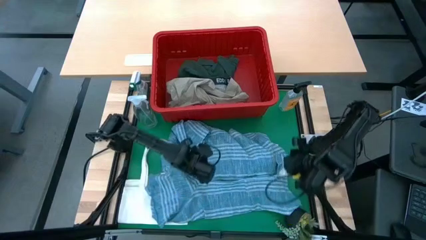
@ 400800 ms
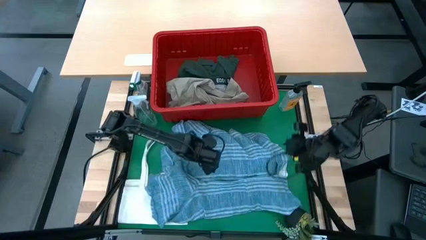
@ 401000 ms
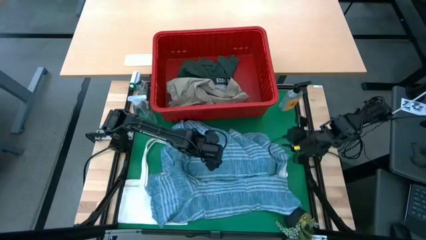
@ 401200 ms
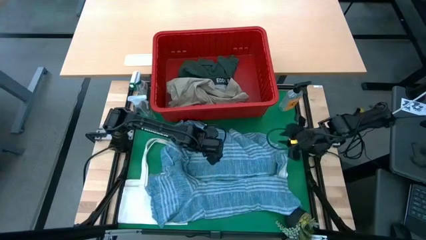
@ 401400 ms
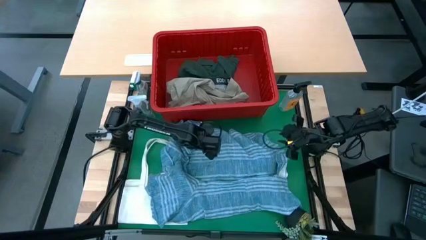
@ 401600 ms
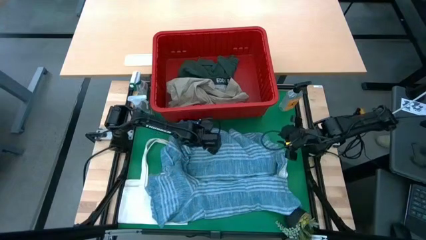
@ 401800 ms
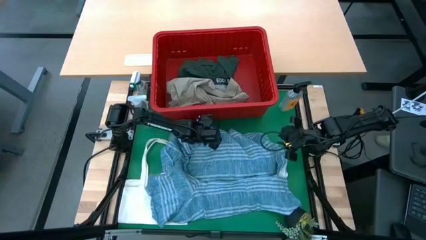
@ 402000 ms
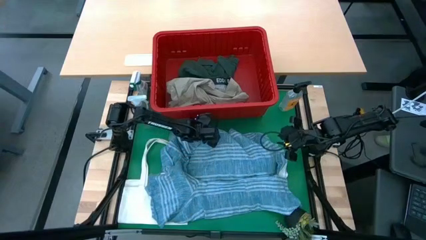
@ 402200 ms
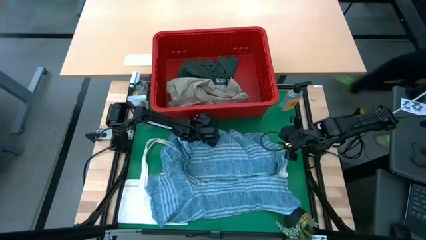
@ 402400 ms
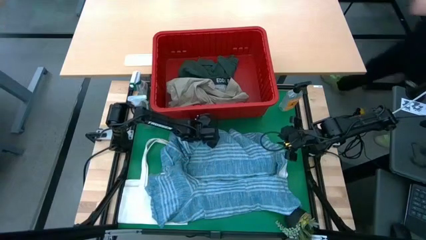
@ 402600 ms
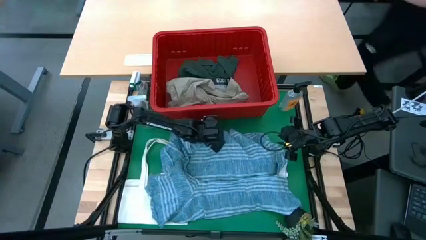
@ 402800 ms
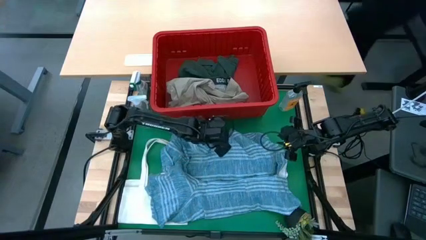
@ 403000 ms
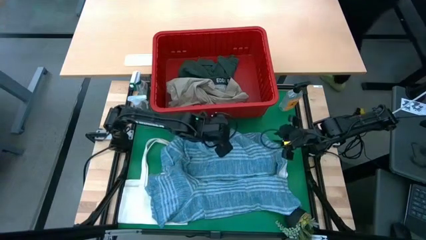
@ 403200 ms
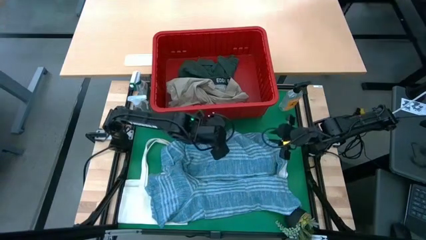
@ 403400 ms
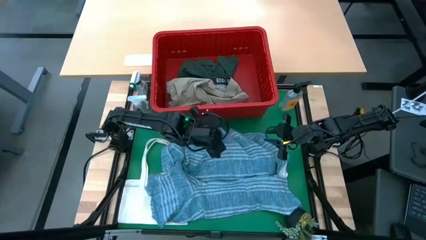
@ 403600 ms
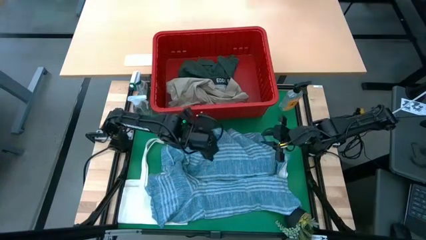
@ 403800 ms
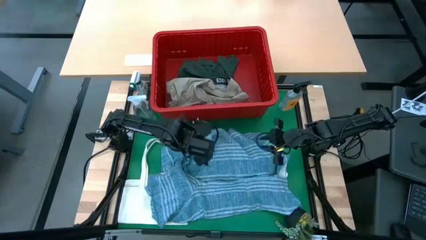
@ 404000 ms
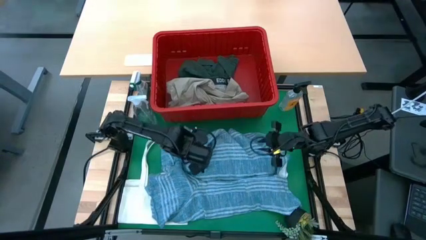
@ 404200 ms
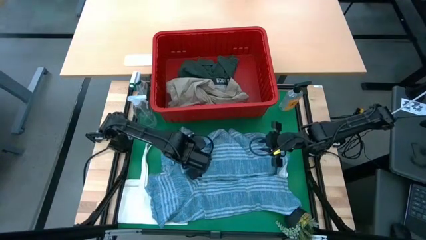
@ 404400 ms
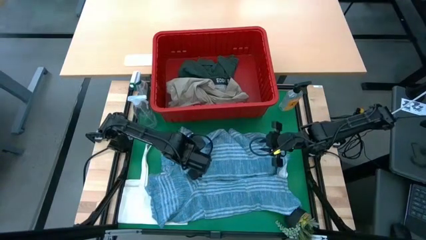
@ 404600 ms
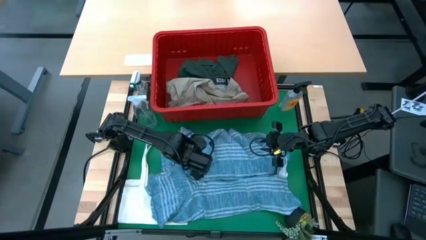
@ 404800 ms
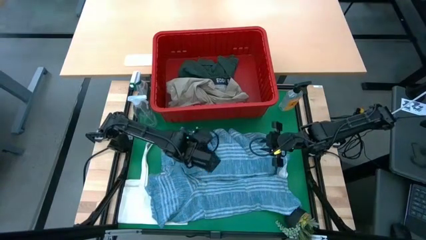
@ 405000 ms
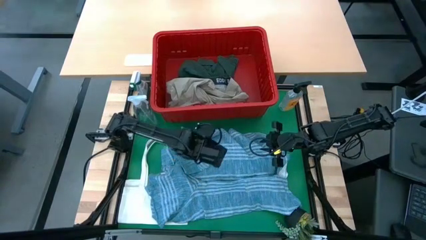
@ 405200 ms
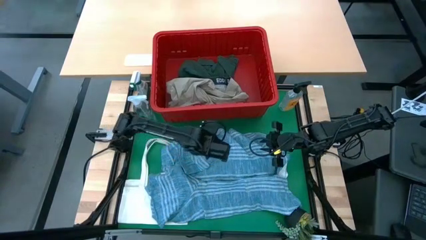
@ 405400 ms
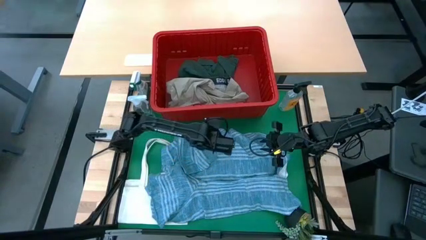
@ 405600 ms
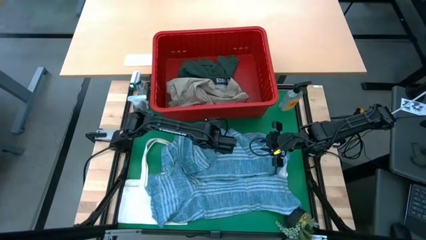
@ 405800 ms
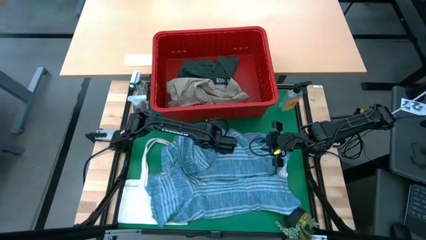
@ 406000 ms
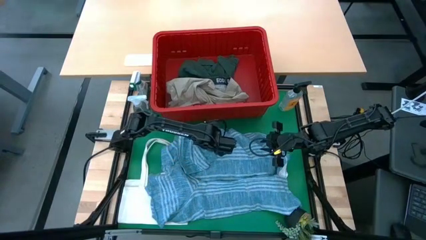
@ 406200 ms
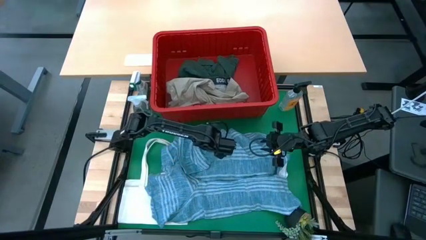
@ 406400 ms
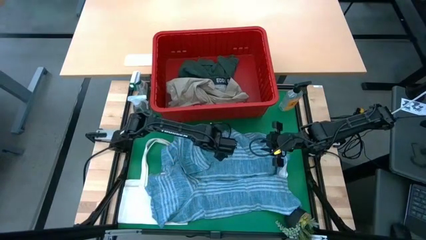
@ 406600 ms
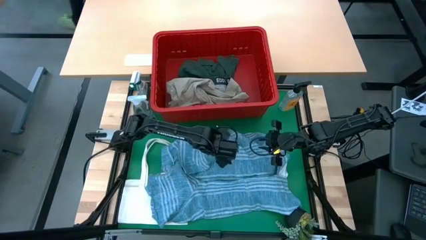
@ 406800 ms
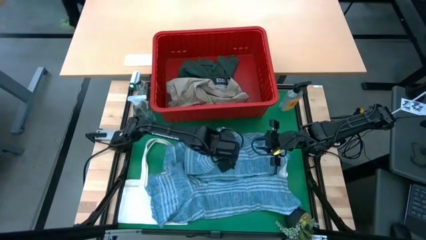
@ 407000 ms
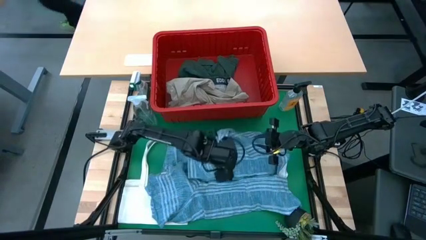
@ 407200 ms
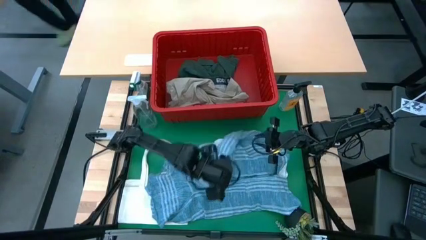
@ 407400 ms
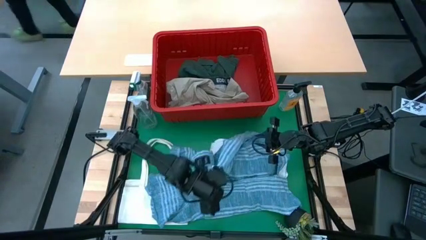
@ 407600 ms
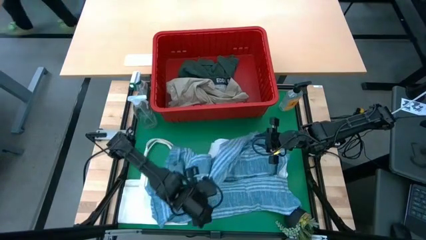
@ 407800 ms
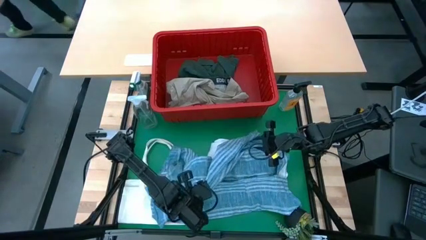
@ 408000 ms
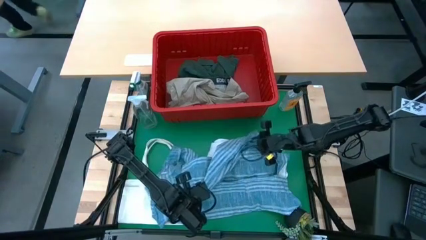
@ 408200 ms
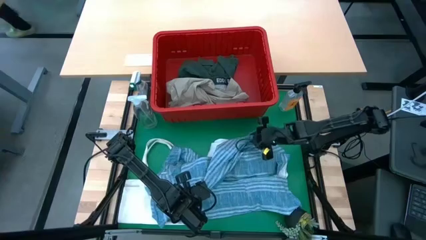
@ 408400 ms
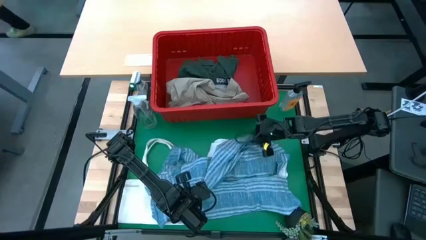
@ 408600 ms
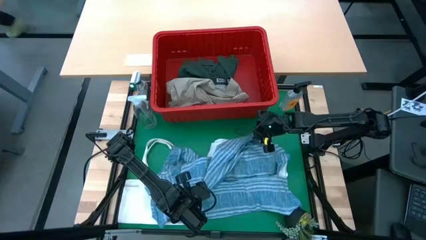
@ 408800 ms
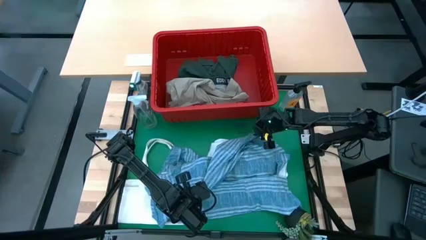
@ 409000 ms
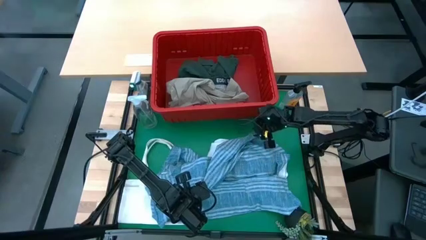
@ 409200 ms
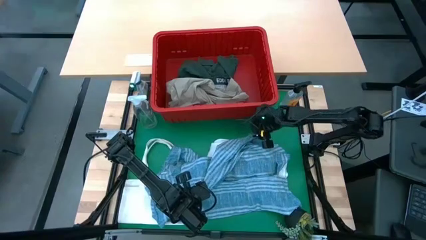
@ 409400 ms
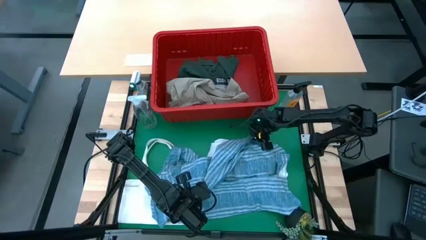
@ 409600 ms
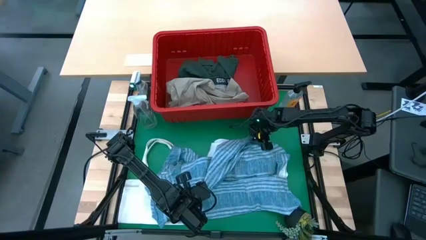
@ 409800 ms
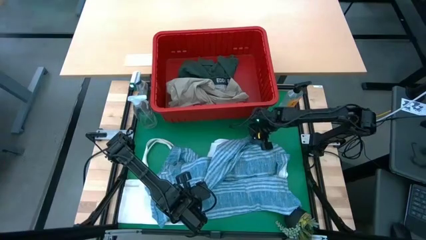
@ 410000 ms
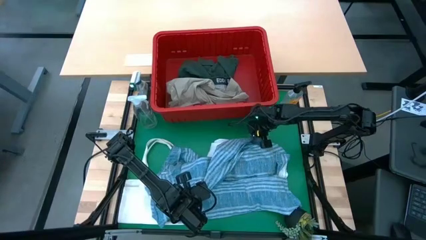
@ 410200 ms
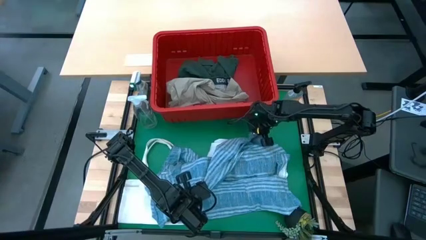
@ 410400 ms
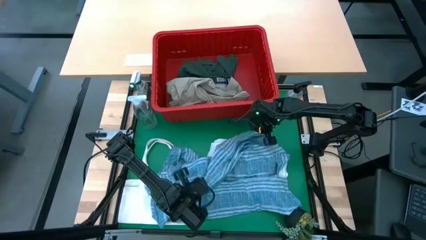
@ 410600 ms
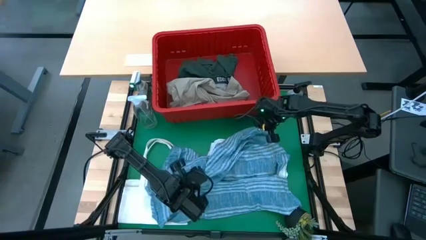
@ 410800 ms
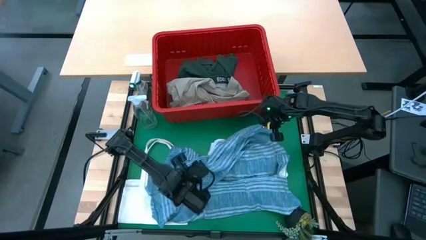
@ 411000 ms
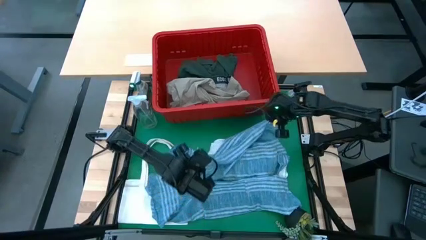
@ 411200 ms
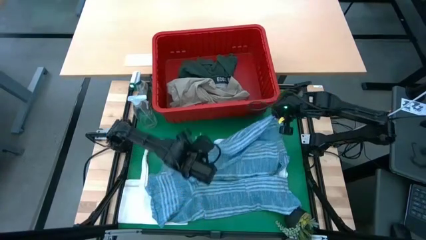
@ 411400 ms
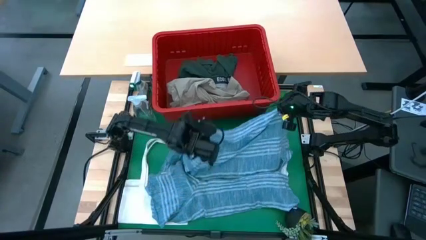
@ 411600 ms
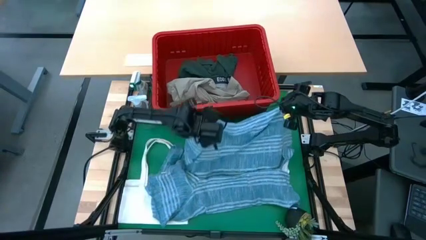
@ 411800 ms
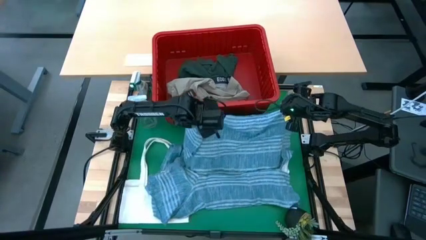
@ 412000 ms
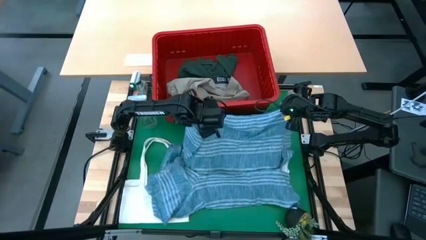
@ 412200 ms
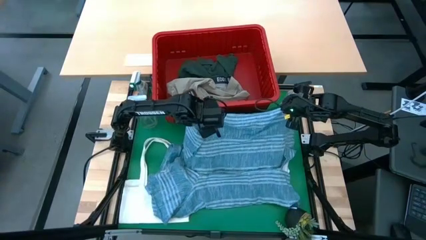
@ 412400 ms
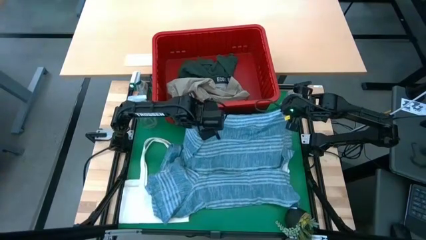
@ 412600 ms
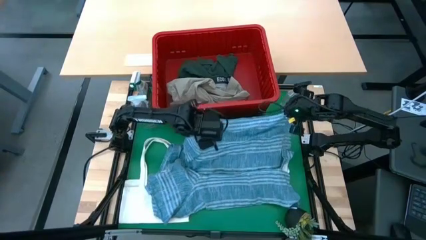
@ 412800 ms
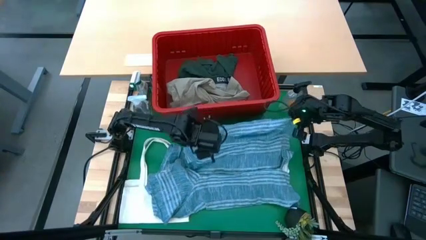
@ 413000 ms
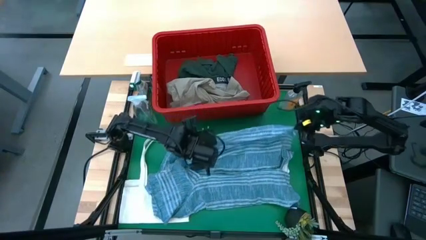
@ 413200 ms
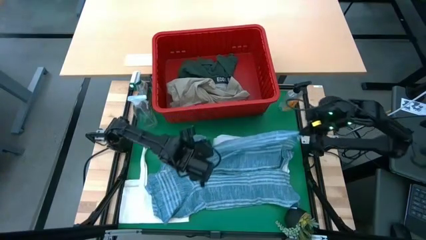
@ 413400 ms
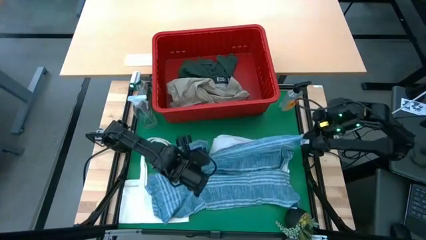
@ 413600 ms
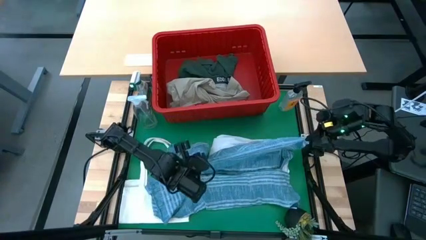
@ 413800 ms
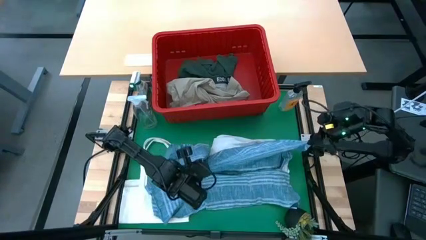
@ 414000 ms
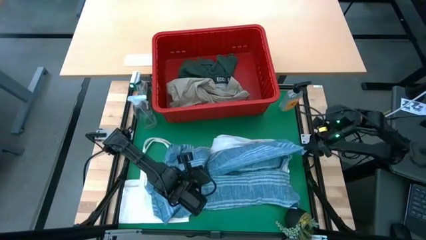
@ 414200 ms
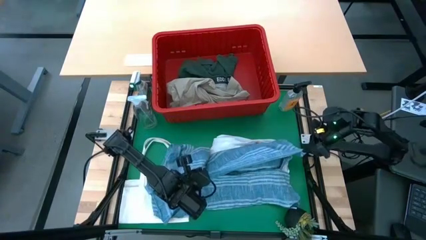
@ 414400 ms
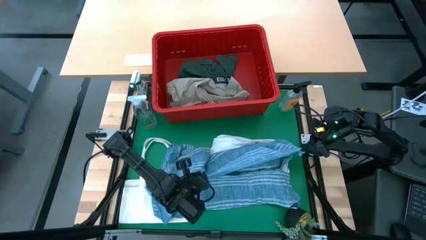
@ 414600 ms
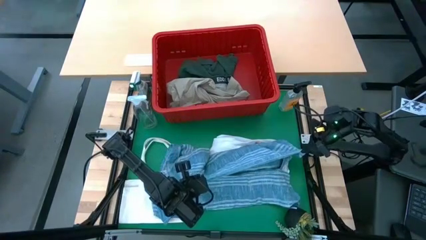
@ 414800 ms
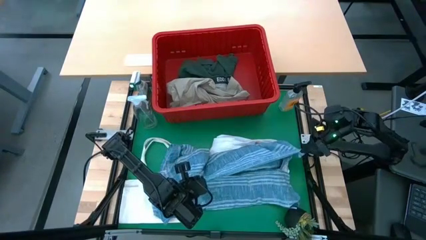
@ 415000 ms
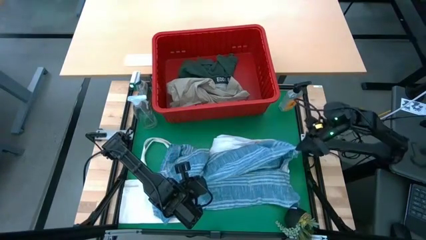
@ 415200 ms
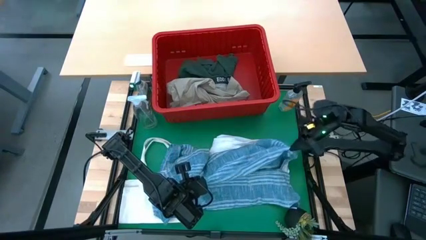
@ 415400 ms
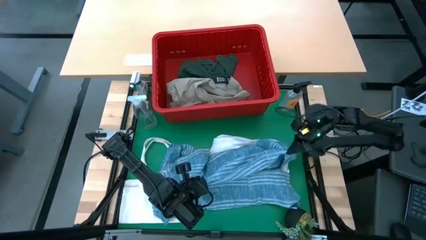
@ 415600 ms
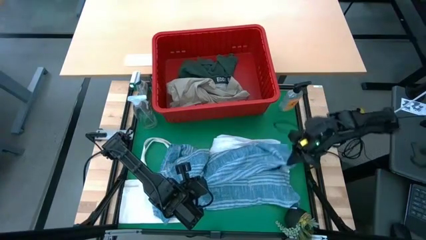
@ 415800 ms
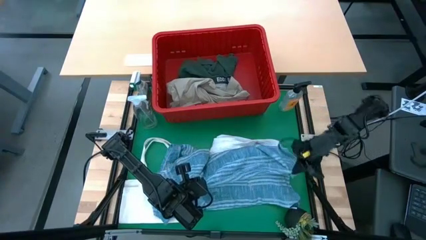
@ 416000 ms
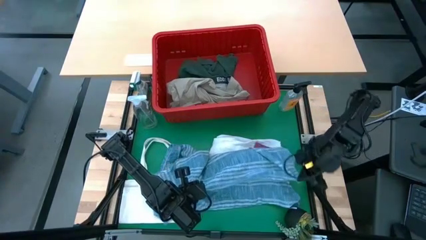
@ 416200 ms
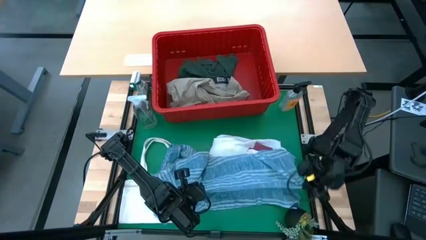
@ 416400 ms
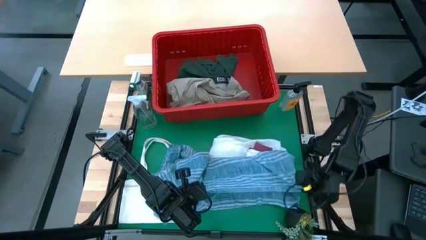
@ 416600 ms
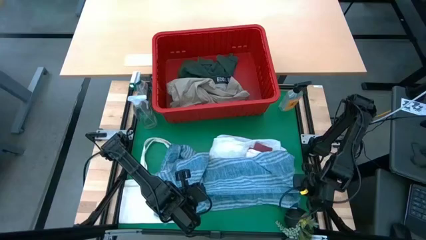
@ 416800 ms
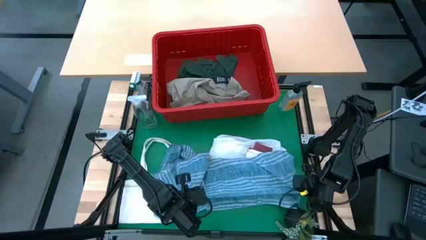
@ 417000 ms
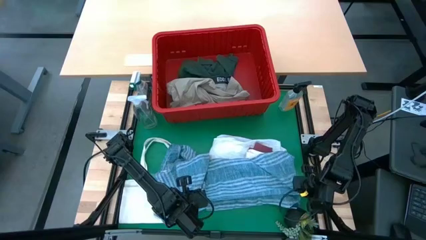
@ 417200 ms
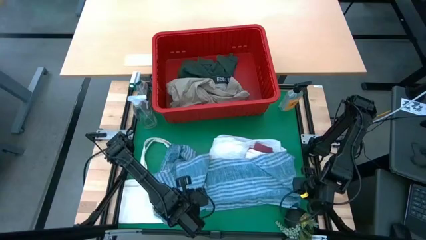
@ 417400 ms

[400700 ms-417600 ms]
Task: Fold Laundry from Bin
Fold the blue checkered polo shirt
